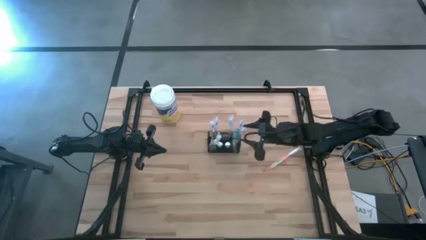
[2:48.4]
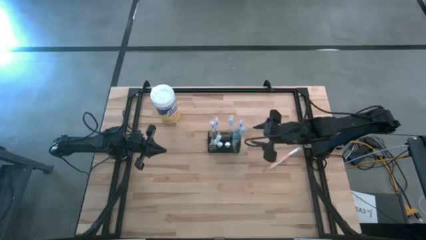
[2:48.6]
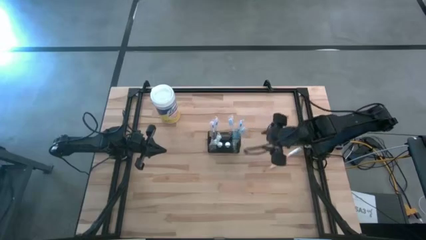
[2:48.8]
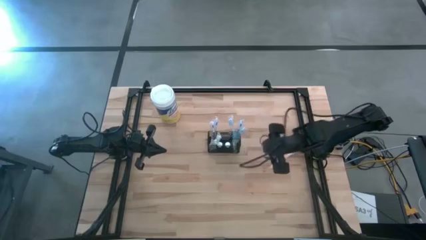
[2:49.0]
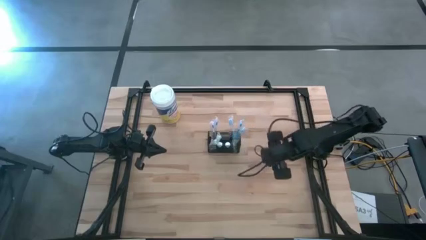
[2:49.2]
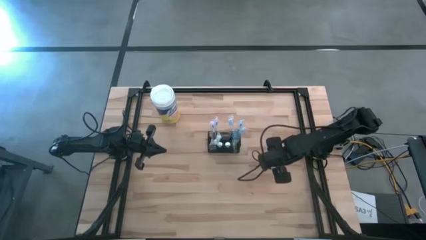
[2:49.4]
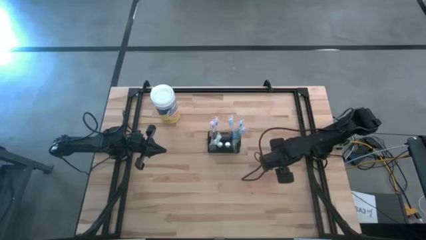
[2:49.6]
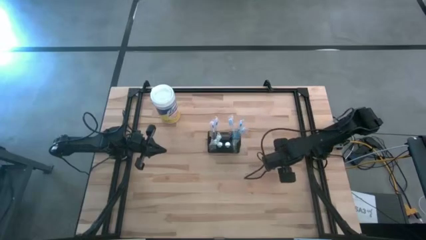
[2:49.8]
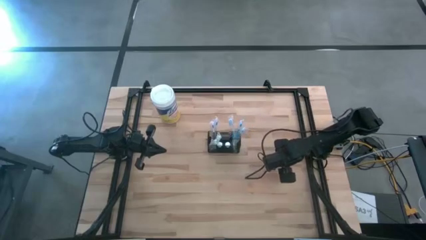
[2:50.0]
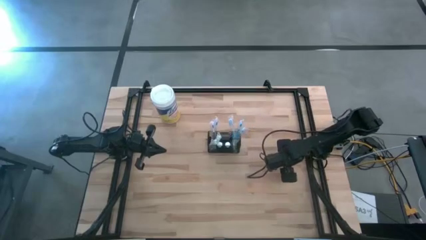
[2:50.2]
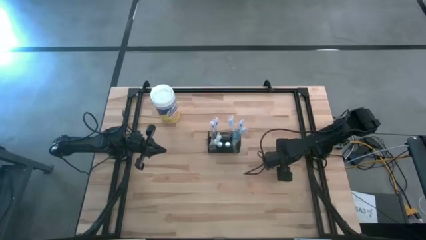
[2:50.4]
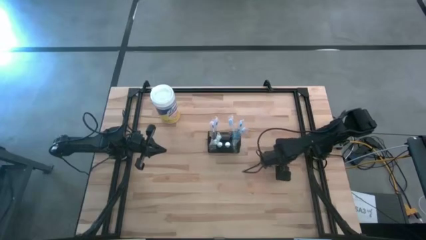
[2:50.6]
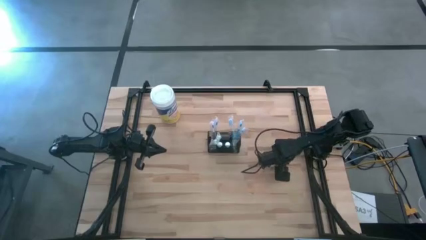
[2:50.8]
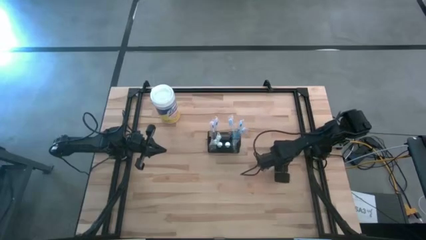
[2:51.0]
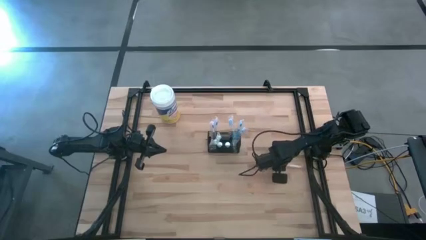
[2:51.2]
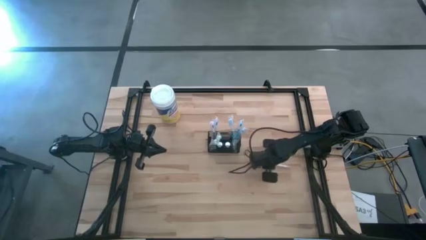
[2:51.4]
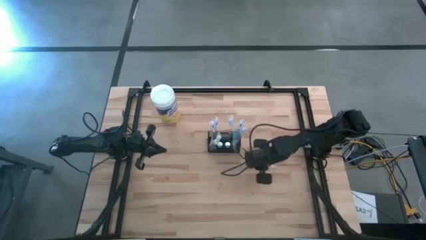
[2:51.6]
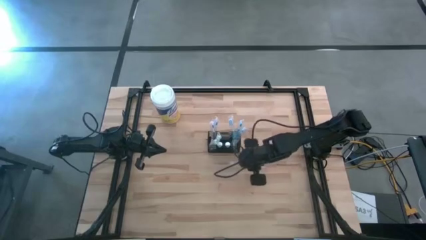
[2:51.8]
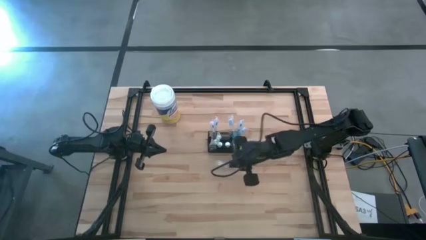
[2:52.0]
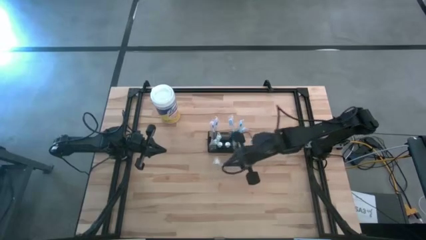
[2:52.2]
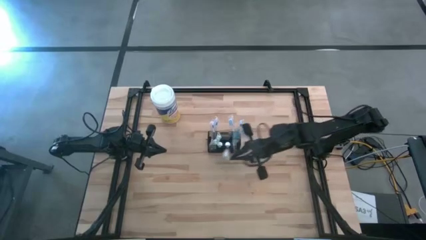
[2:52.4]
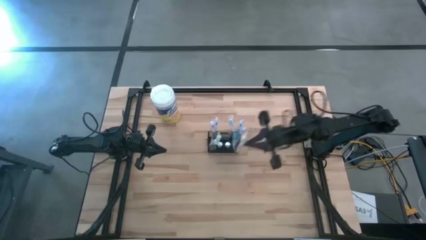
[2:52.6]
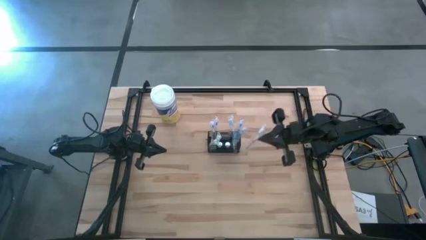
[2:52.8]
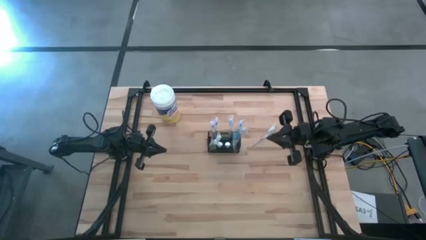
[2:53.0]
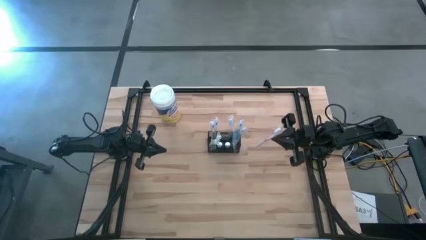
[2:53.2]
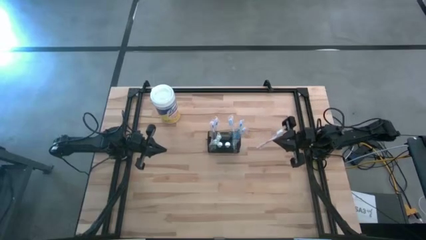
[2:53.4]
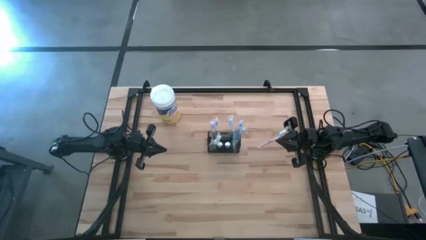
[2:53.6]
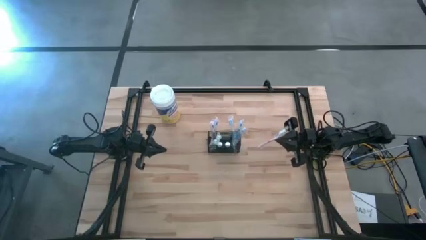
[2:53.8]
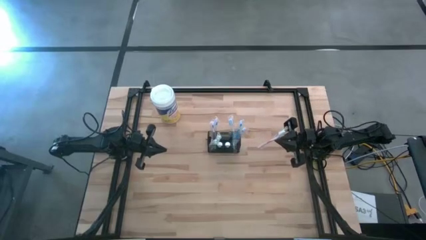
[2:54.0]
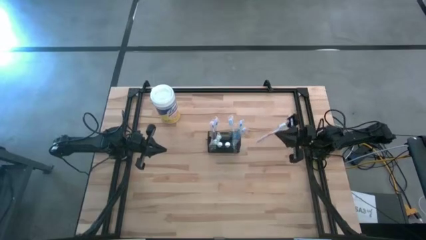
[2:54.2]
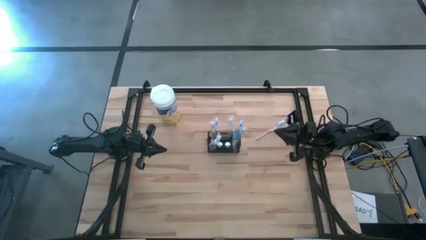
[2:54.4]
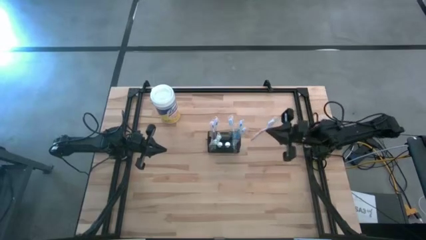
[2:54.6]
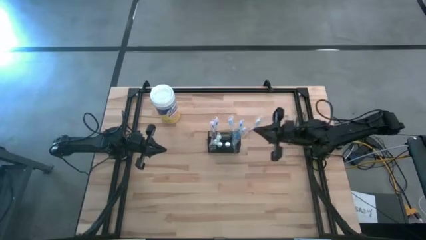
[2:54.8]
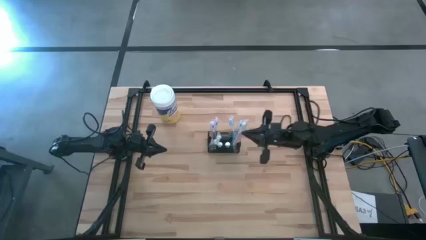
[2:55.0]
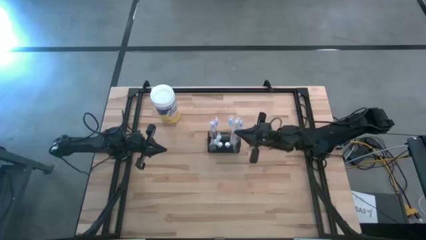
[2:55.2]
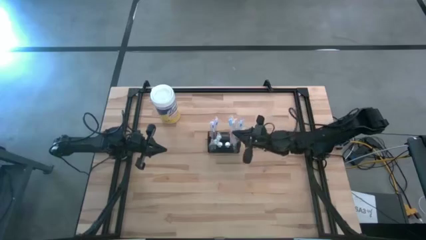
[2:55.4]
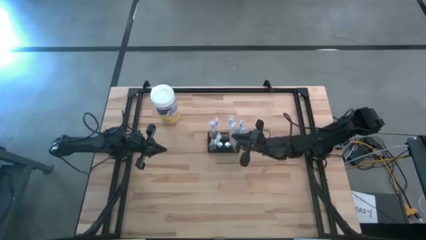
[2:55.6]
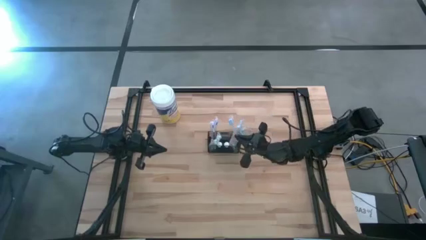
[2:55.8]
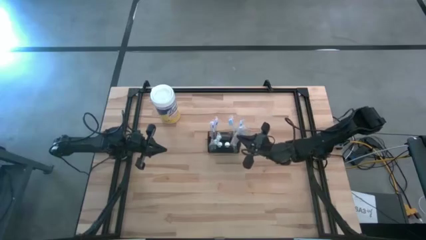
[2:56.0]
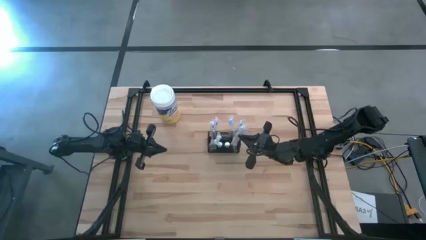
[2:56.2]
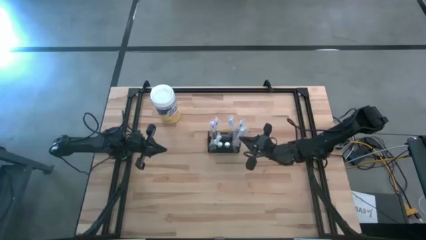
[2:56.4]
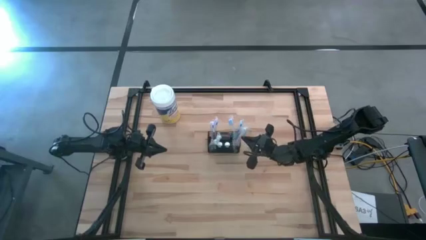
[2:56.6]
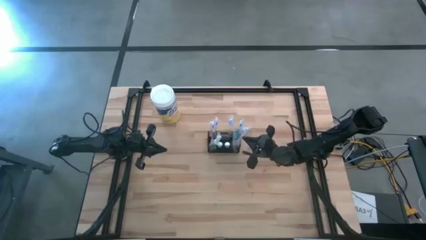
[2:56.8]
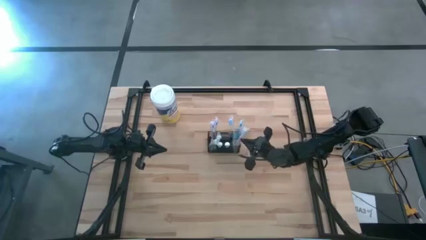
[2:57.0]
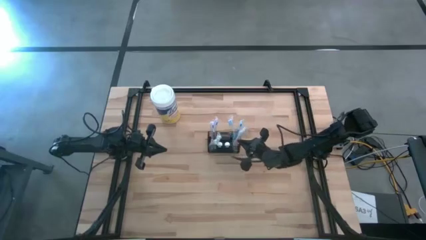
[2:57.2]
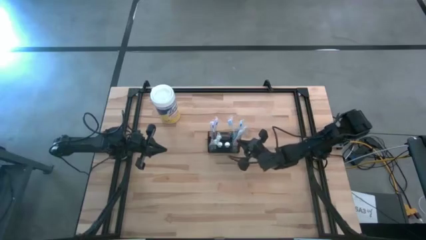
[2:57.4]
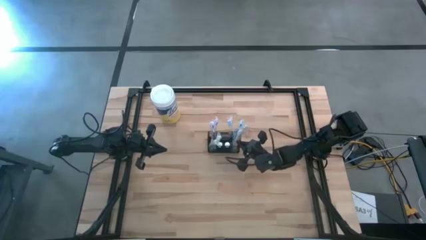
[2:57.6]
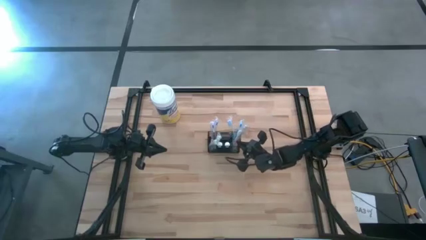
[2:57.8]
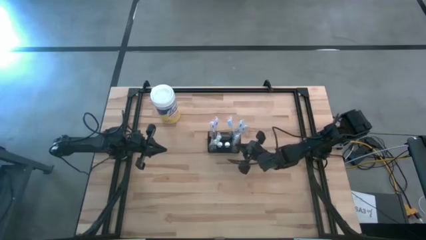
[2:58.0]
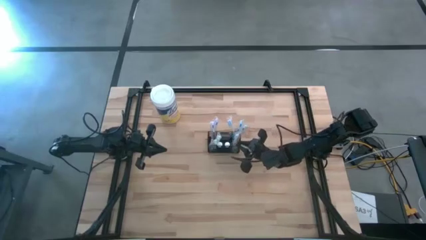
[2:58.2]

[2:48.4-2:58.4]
Task: Pick & Place toothbrushing station
Put the orange toothbrush into the wire organizer

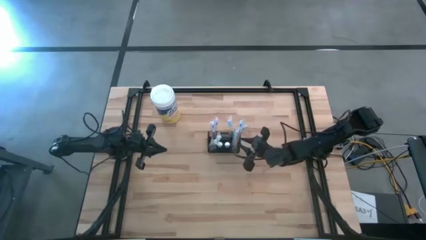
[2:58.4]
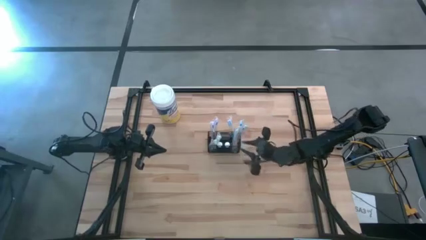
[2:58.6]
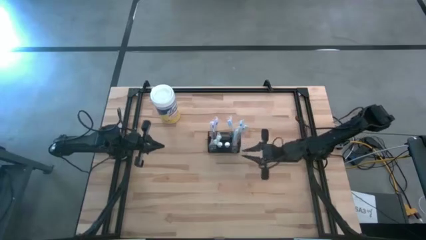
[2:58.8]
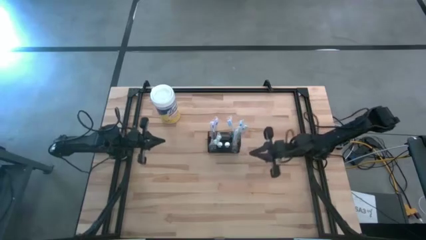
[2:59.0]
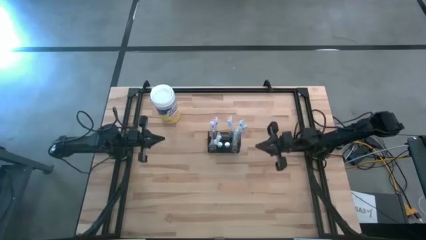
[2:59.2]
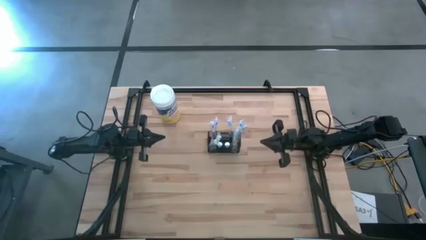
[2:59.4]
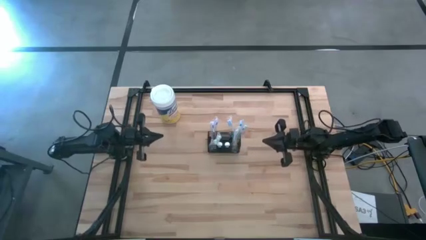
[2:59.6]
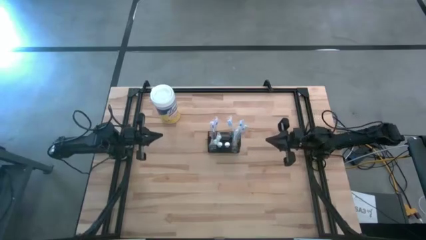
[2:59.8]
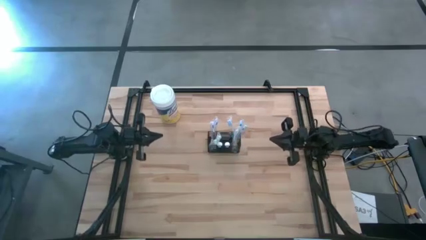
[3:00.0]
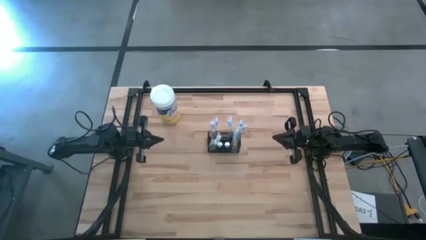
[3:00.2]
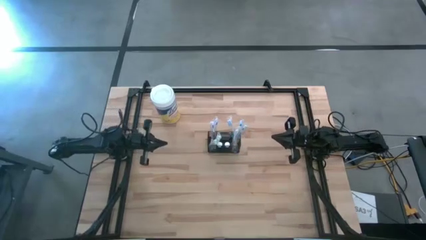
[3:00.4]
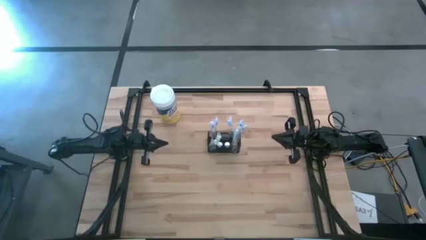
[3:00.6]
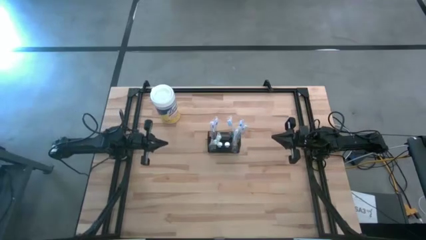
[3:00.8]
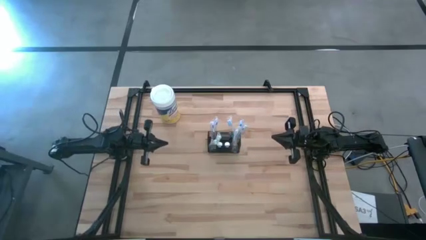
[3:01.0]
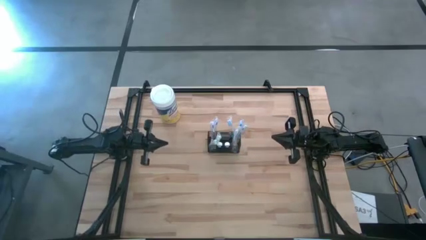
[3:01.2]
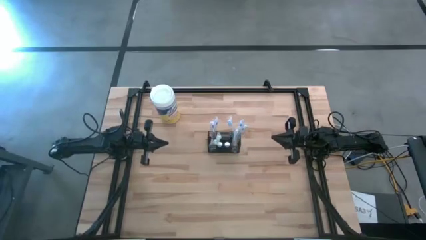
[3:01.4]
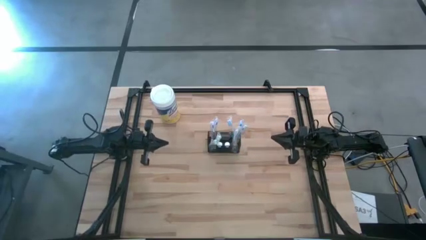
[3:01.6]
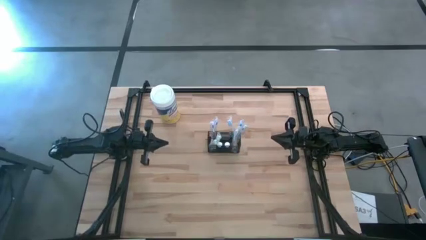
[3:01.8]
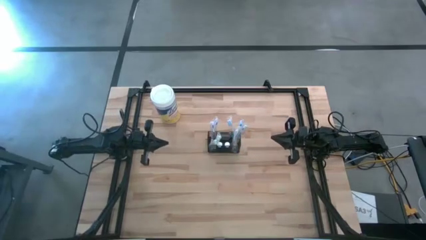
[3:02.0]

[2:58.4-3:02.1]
Return to Home Position
